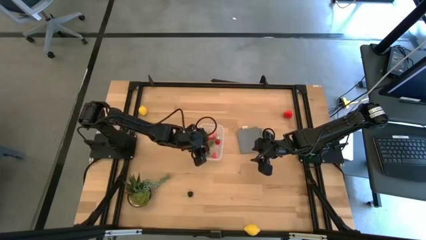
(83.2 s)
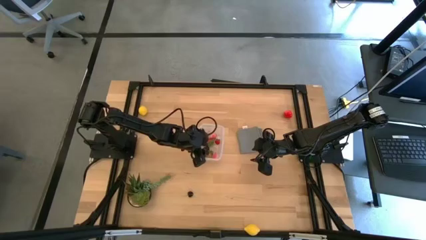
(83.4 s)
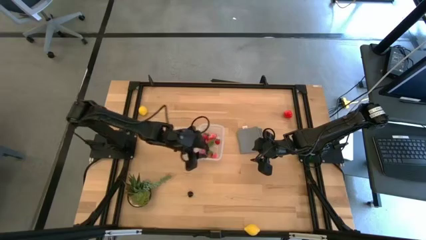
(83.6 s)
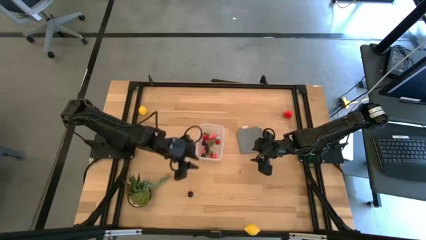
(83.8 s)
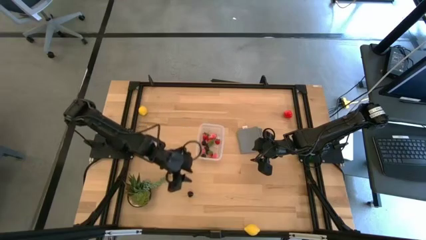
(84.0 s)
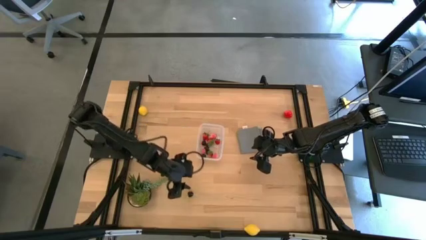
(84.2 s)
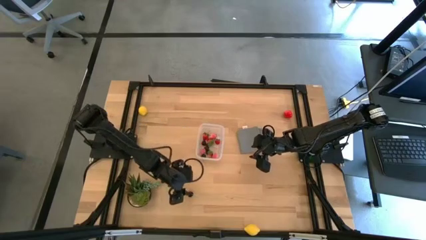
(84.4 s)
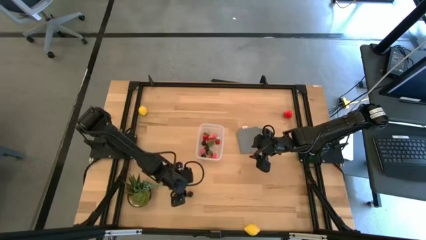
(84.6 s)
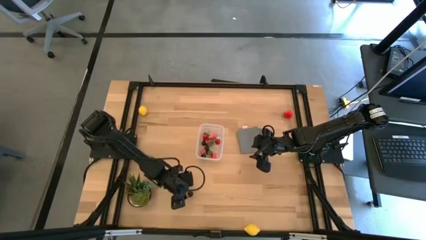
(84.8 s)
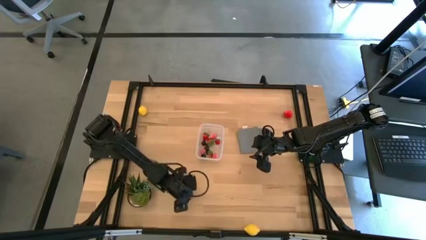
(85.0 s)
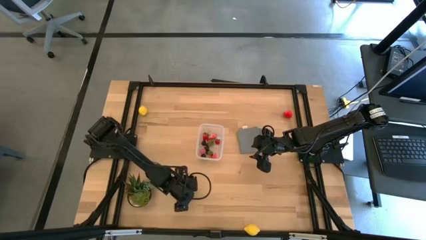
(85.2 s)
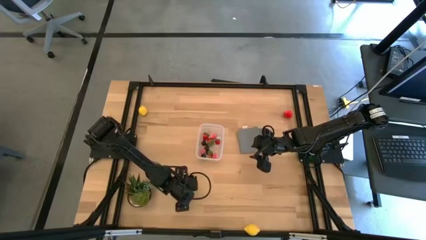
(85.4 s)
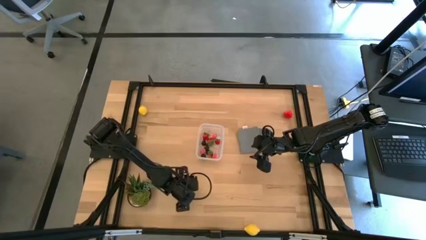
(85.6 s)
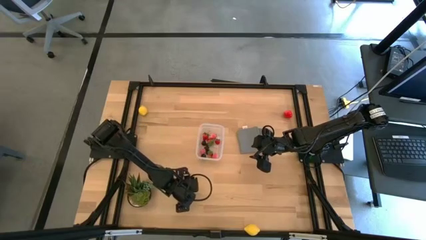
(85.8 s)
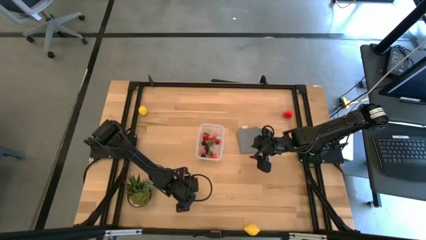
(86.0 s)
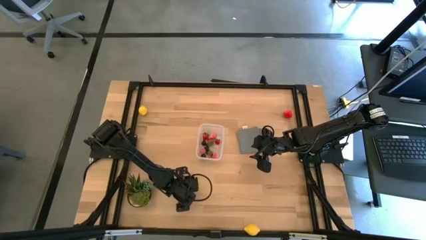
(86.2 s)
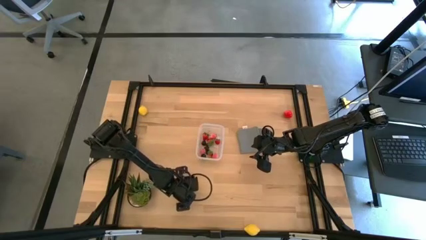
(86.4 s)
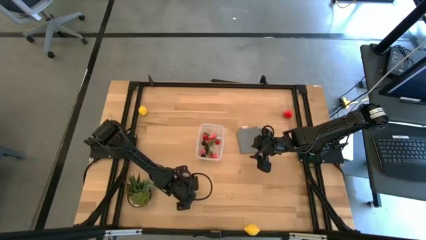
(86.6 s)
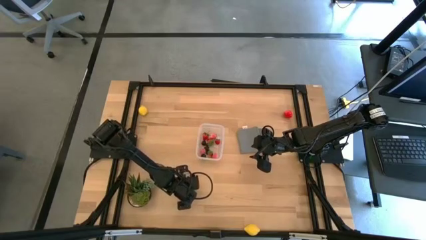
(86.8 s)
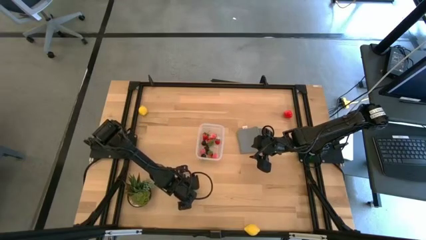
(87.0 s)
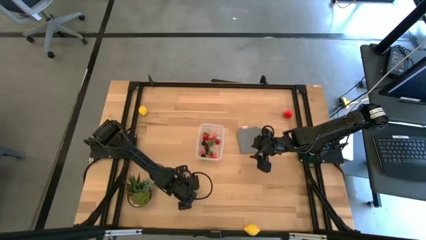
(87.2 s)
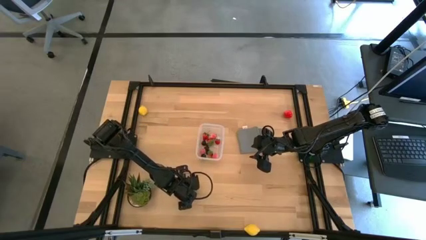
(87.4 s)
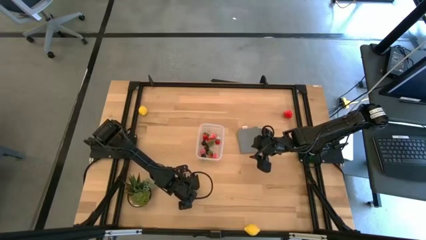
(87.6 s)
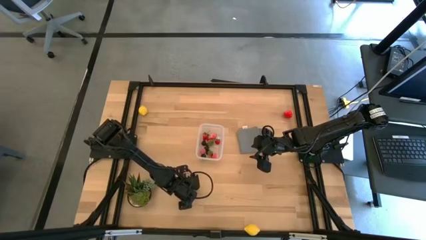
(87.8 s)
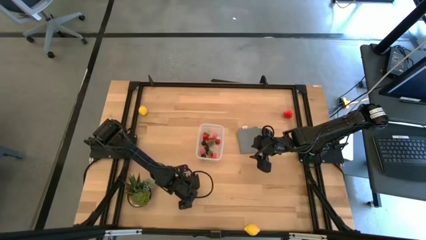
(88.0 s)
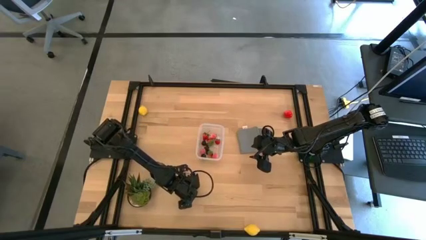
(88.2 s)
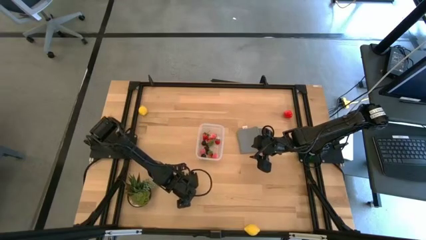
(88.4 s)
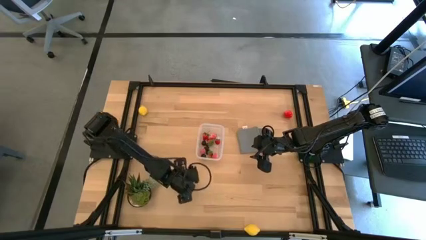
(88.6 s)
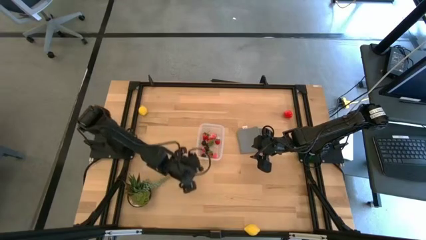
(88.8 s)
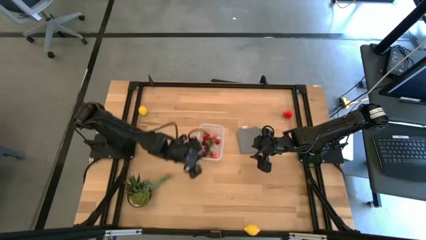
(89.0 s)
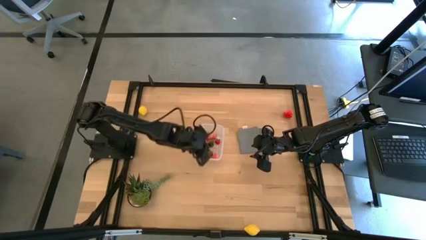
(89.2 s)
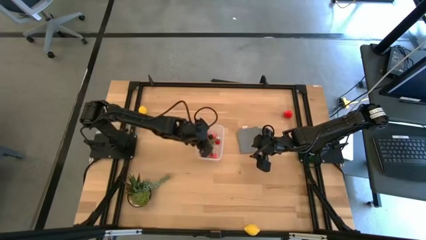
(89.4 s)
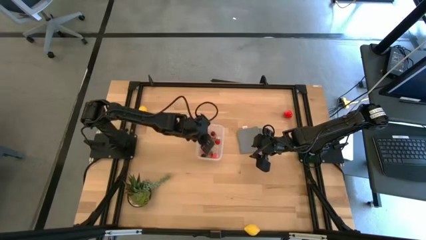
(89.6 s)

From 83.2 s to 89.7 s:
Task: Pick and placing Produce into tupperware
Put the black cherry into the transparent bin

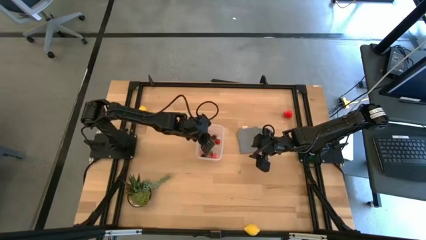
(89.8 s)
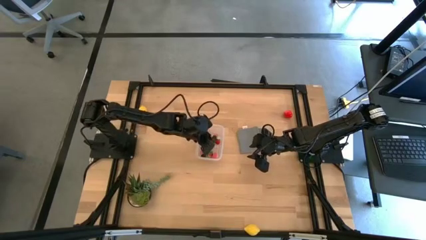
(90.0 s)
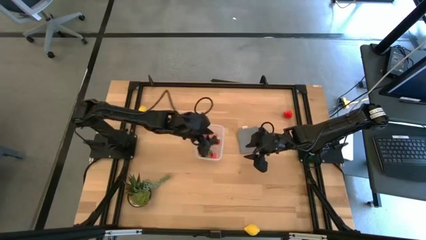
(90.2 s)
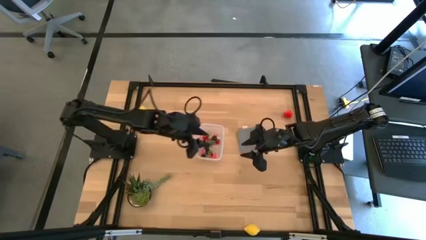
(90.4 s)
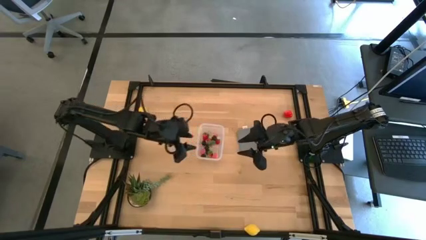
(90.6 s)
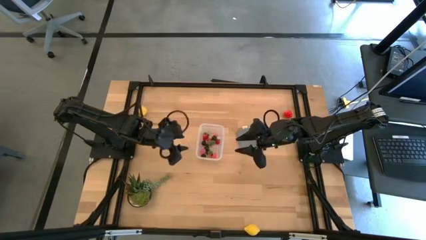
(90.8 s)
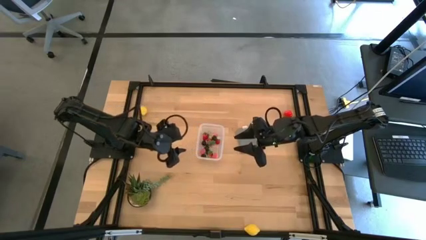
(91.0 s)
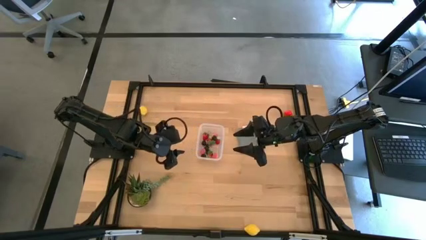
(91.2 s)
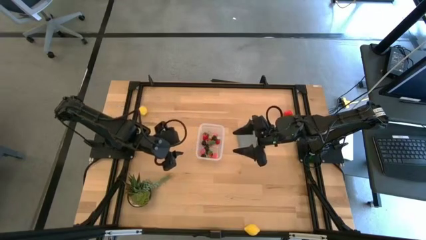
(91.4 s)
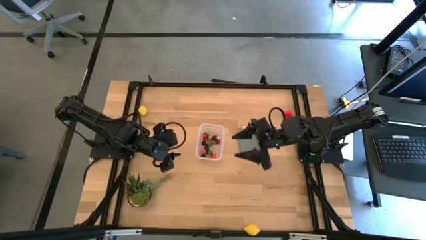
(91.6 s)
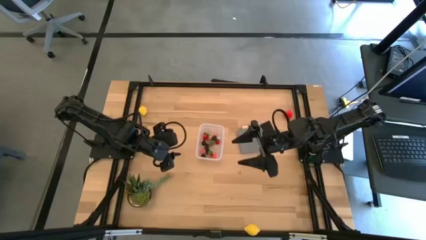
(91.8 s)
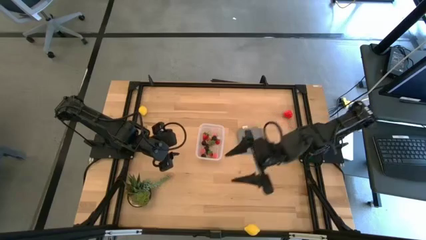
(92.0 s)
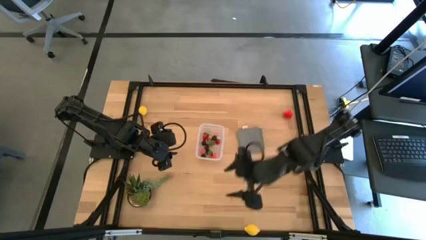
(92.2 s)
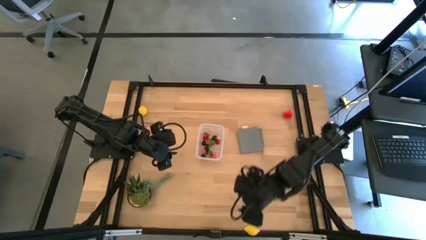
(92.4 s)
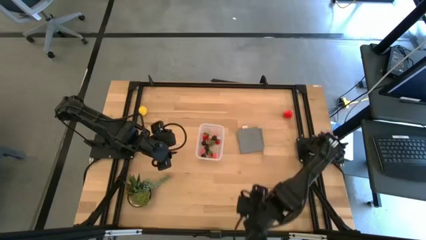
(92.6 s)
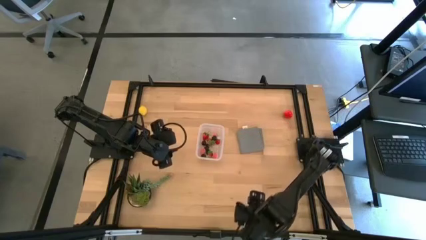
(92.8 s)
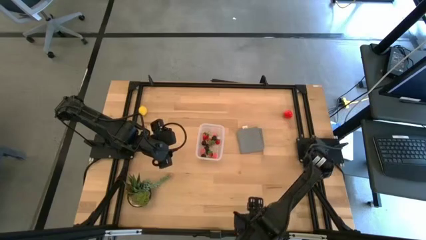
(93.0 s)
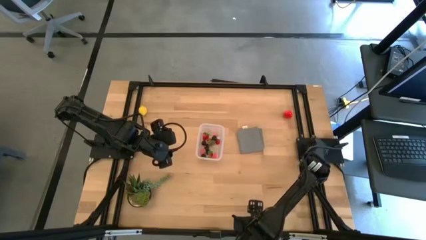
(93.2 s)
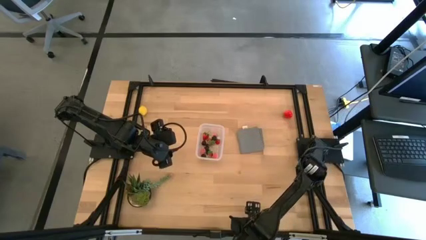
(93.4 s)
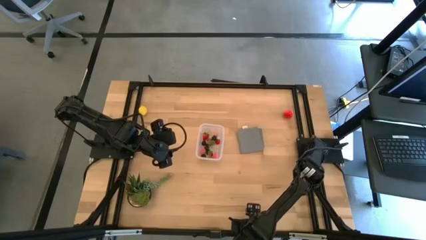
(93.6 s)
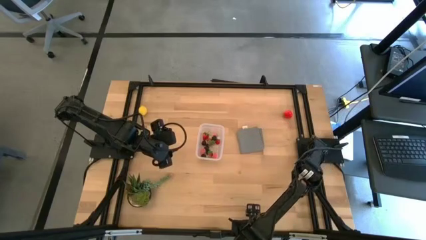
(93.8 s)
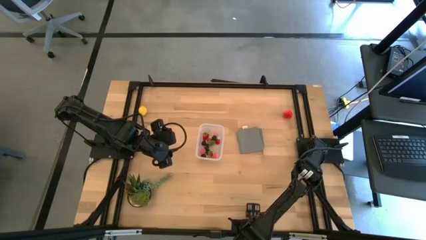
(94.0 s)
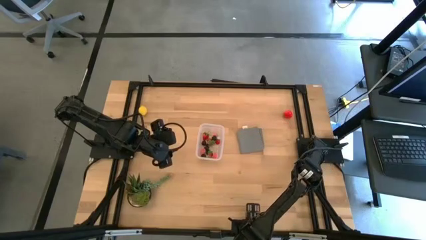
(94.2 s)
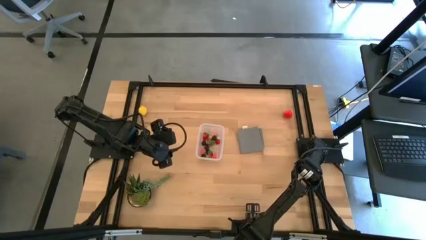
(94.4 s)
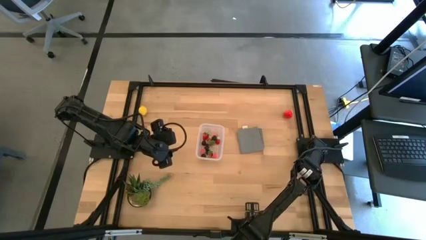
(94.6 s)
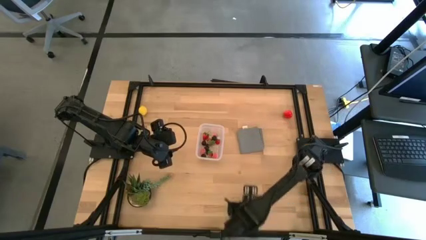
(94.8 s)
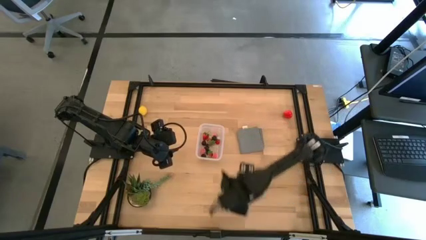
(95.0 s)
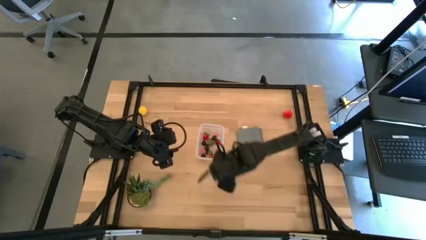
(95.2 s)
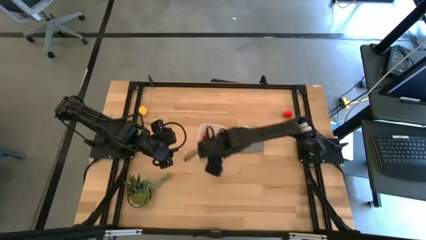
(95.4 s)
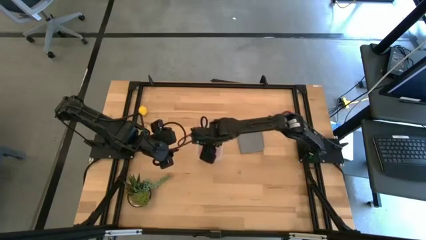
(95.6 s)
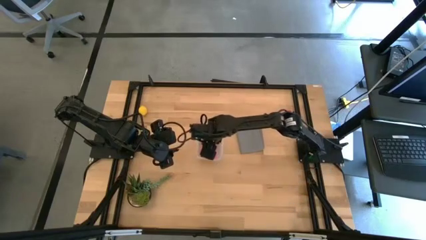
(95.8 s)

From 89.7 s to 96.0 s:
Put the lemon into the transparent bin

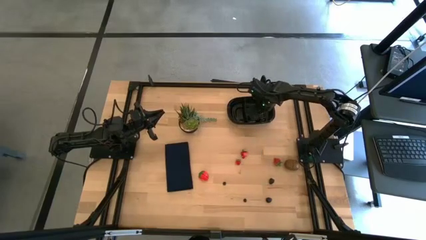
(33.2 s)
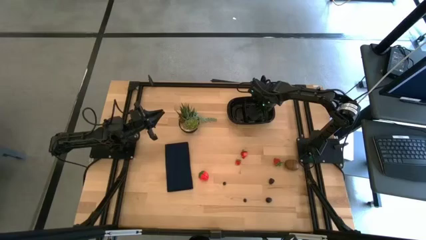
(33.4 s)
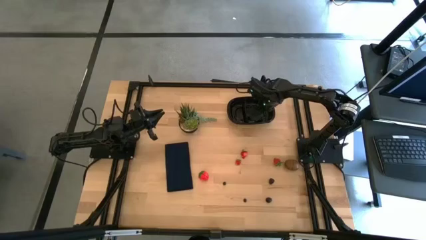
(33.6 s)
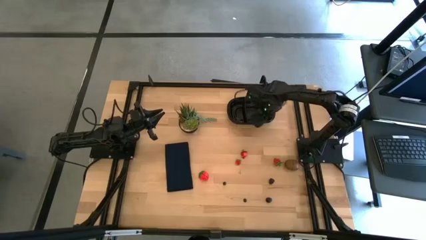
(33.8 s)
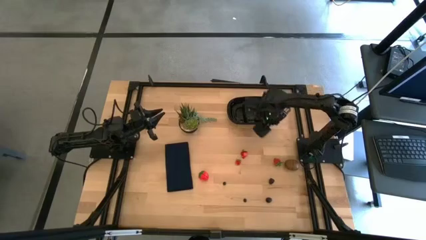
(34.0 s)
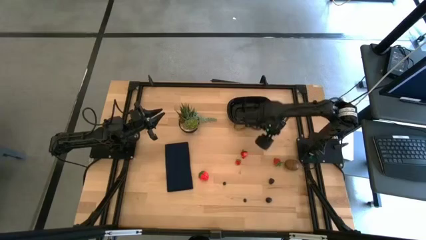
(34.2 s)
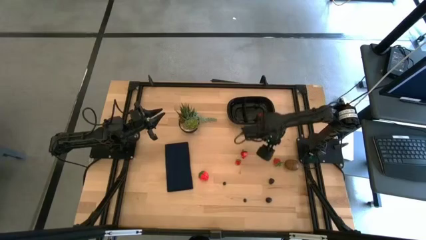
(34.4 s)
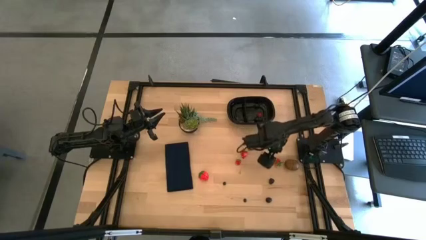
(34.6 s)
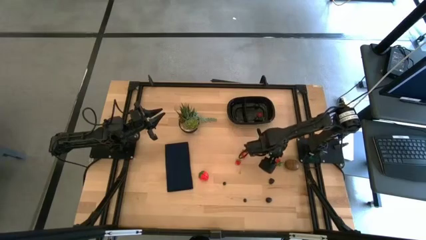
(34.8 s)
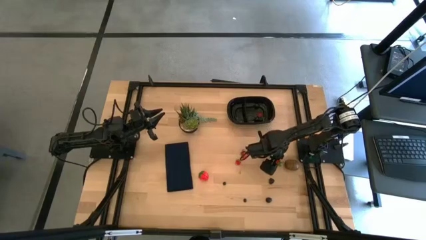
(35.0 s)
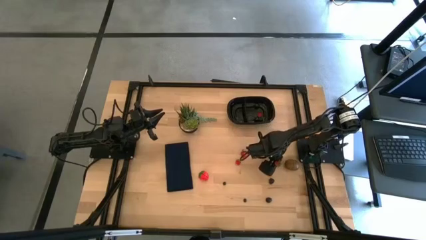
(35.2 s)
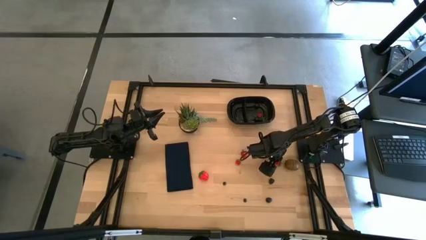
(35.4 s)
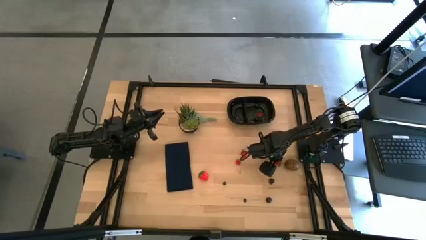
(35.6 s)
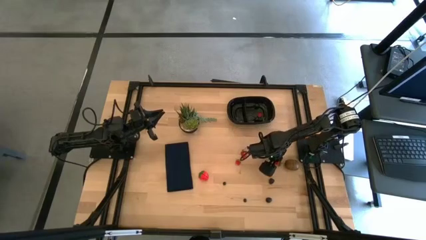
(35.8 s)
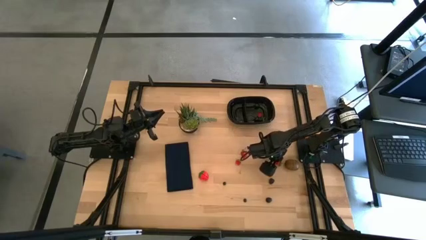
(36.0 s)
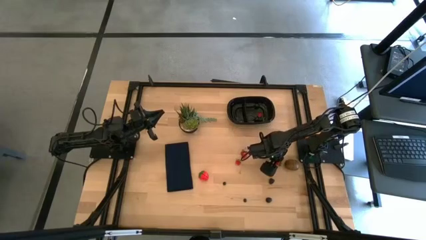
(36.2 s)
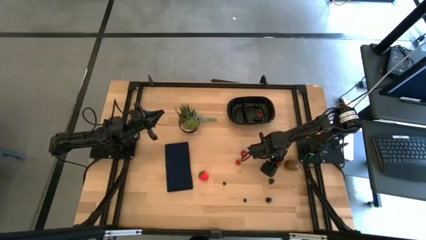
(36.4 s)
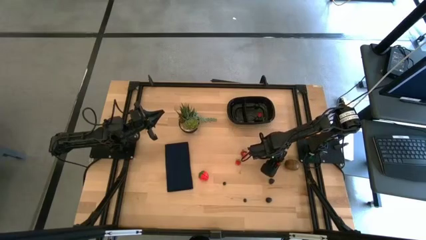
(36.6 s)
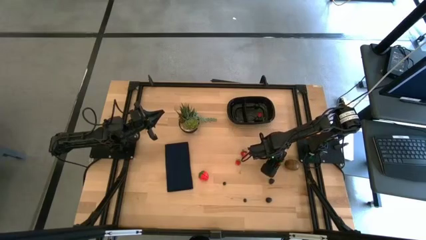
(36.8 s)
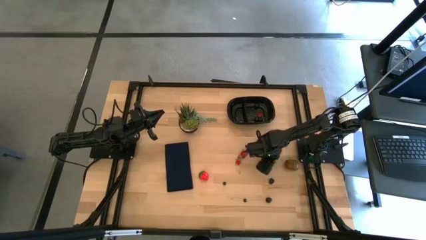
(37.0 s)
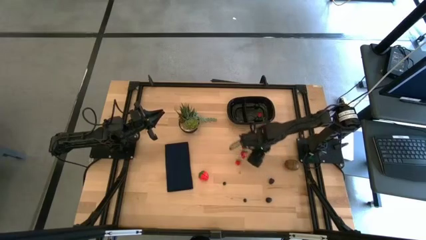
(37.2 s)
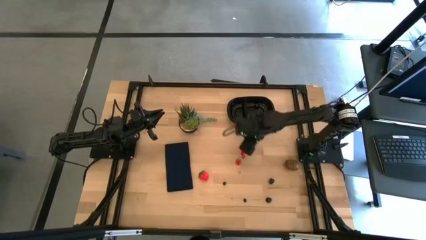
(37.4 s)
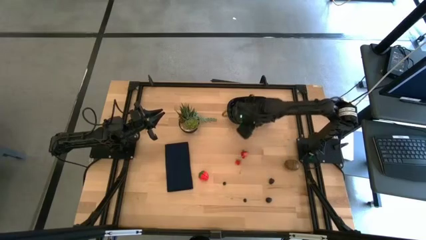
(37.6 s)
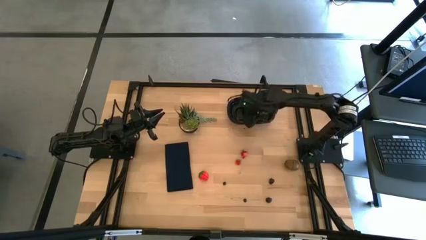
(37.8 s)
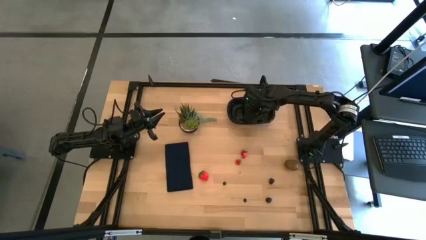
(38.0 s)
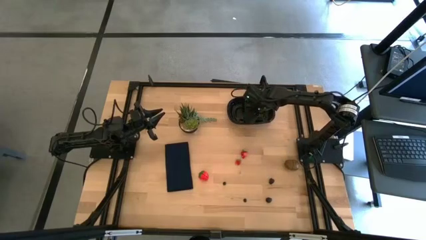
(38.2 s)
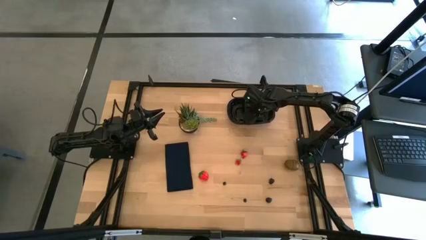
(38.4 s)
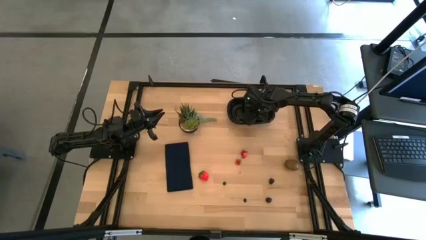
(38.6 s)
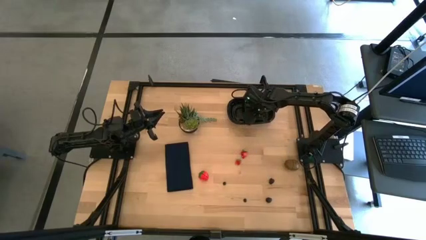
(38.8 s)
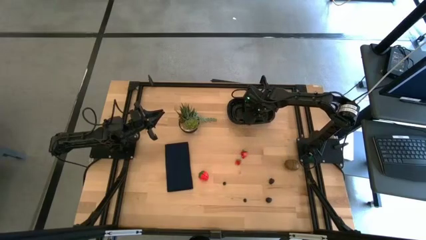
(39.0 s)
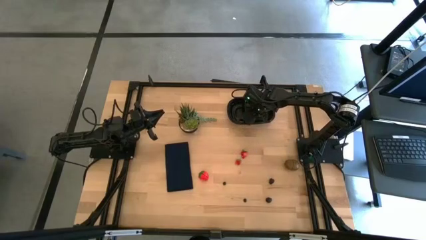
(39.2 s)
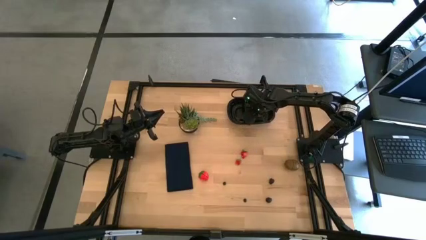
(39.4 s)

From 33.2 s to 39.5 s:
Task: Pick and placing Produce into tupperware
Put the strawberry into the black container
